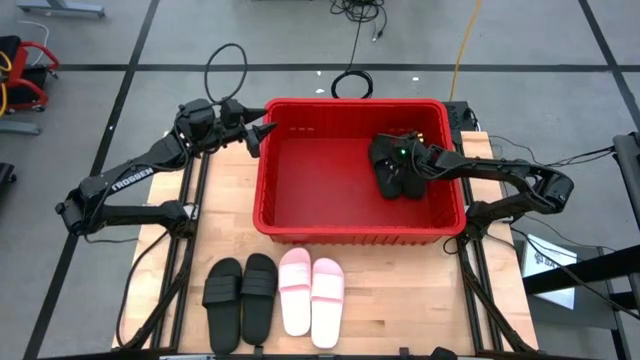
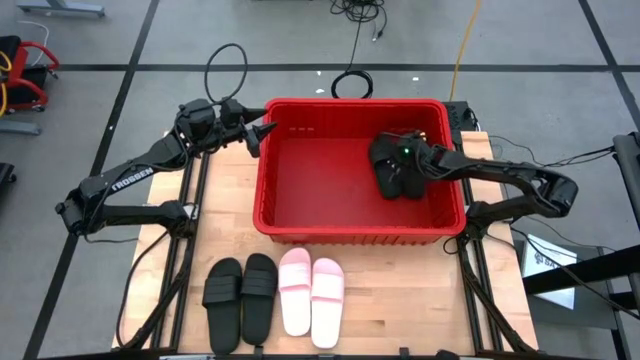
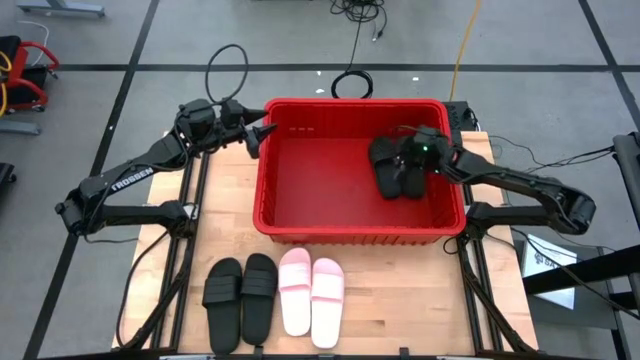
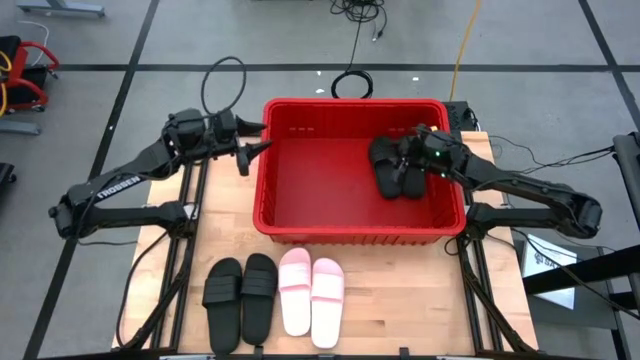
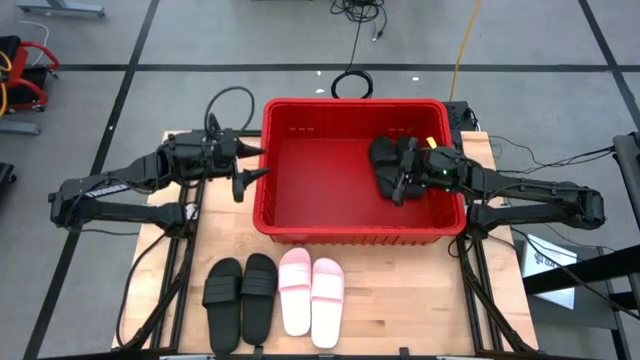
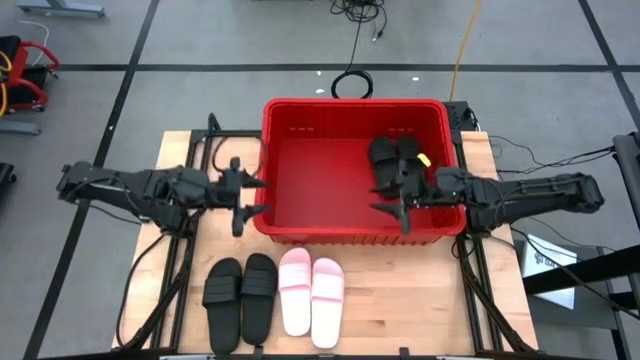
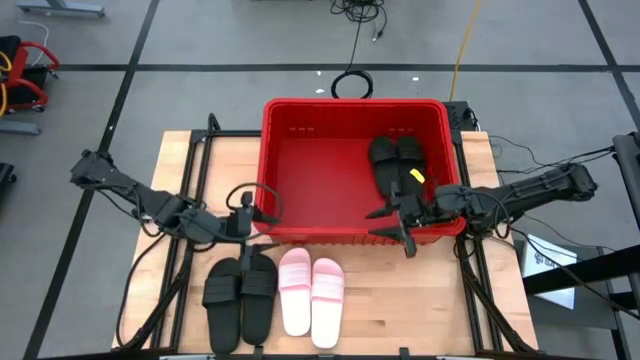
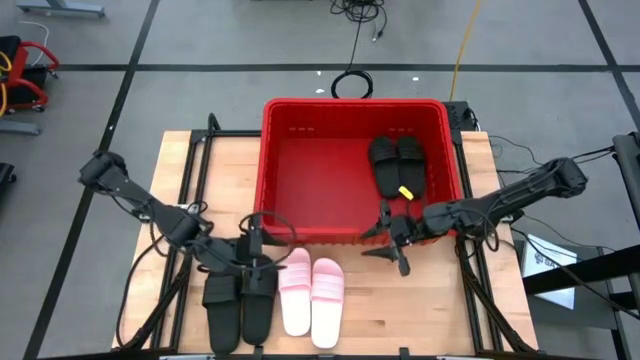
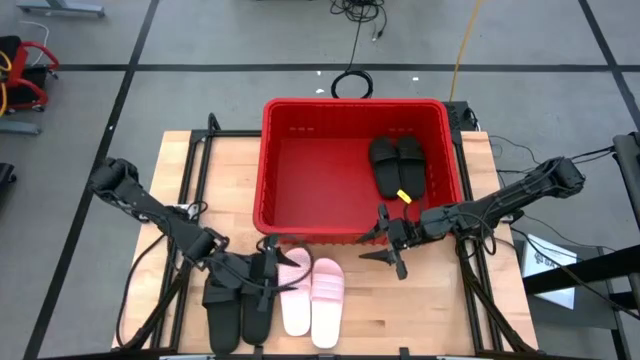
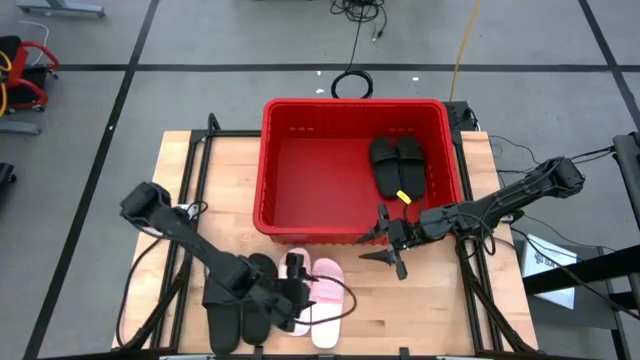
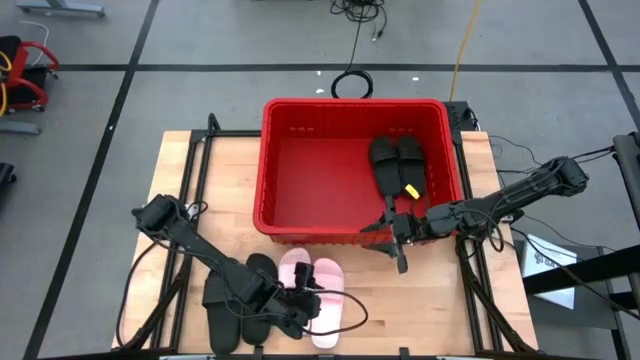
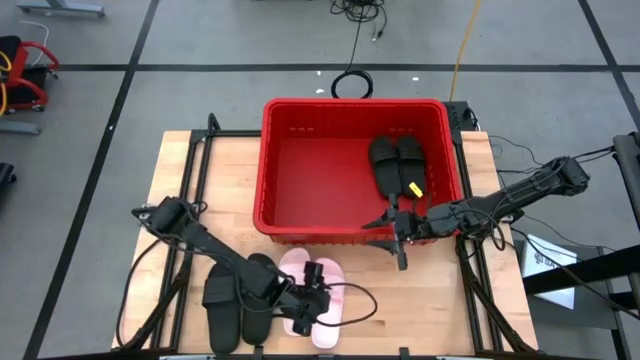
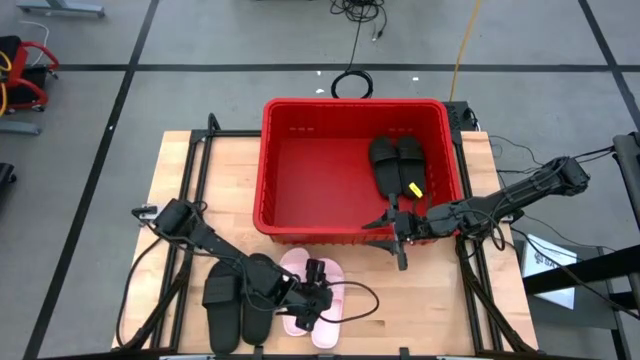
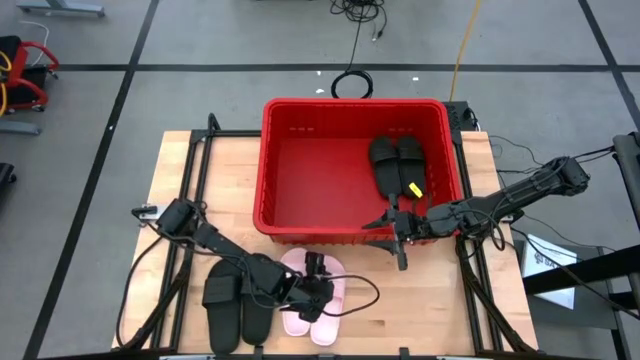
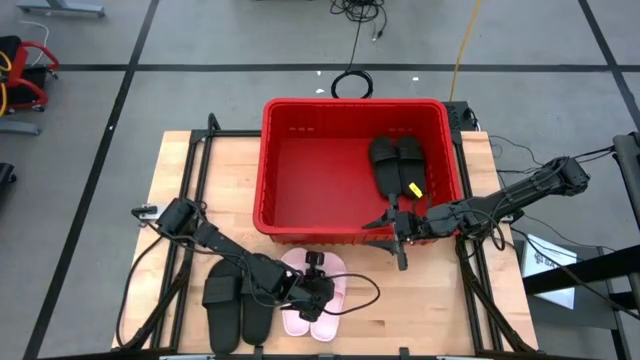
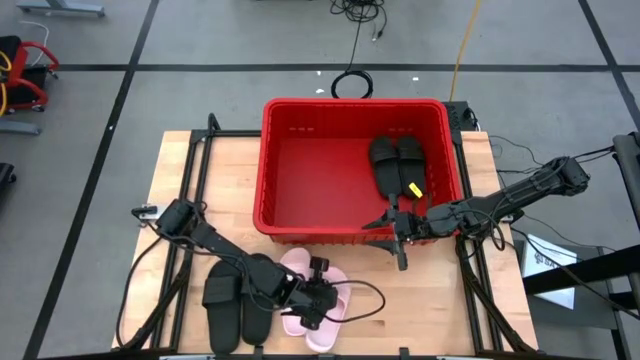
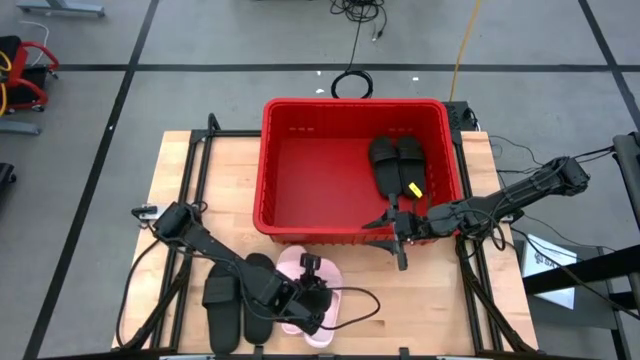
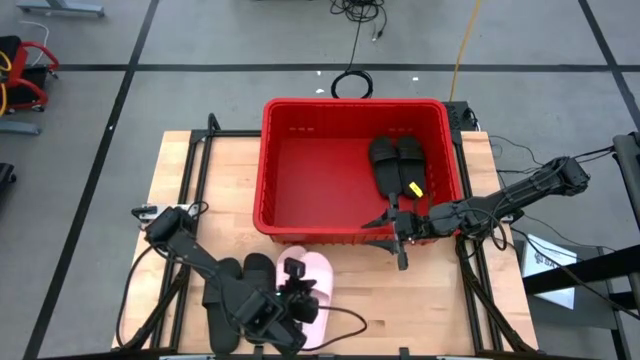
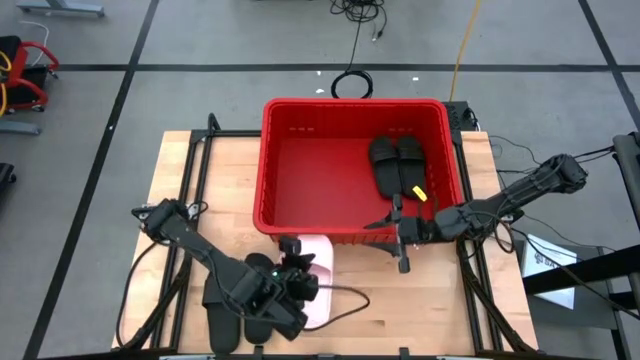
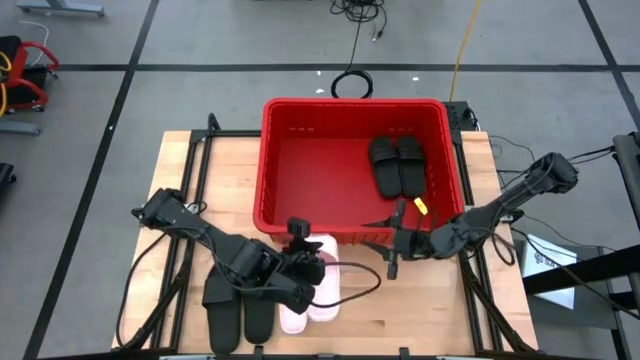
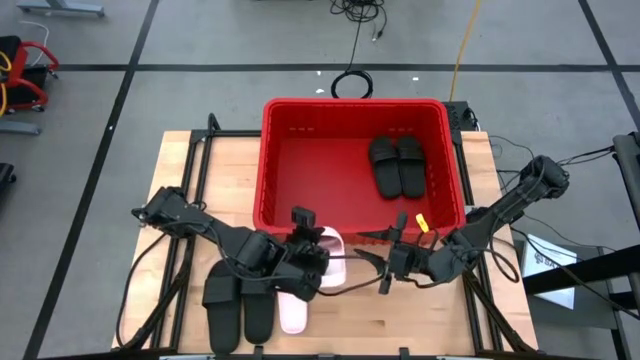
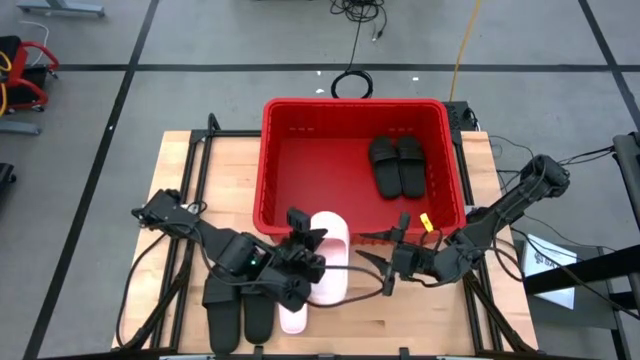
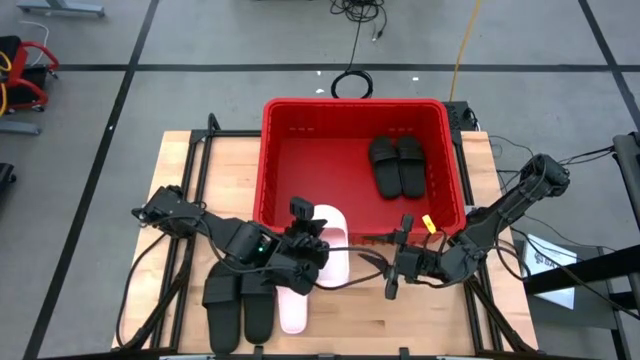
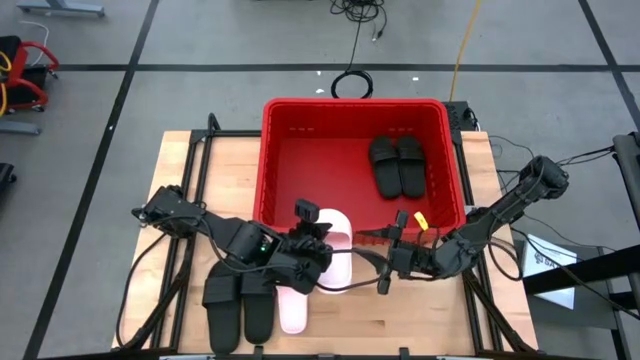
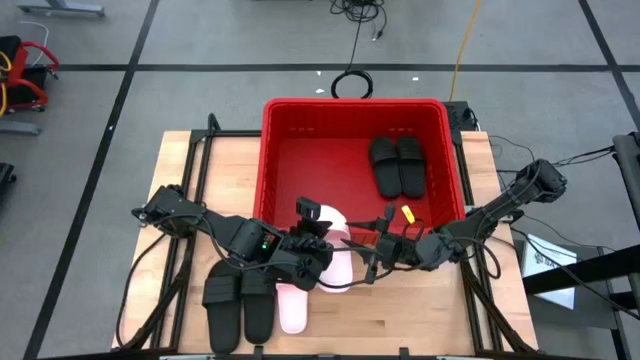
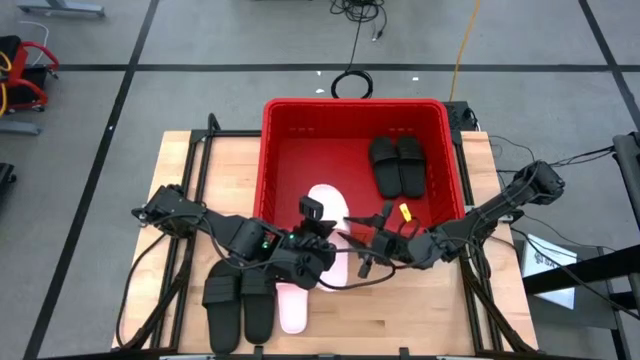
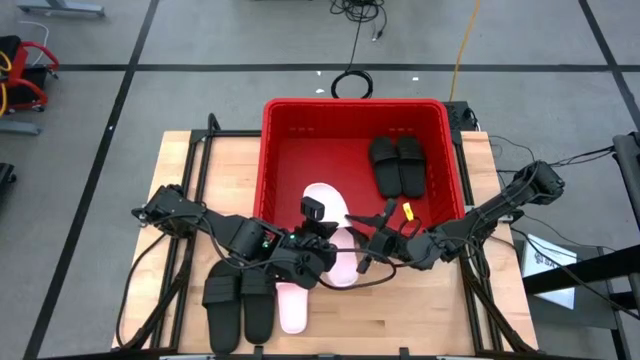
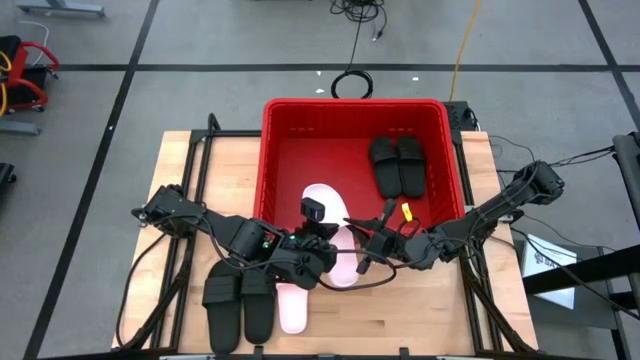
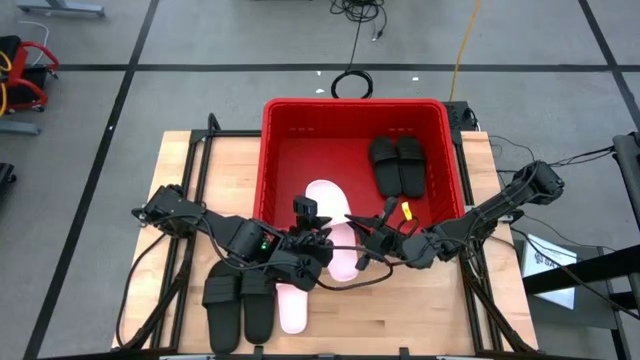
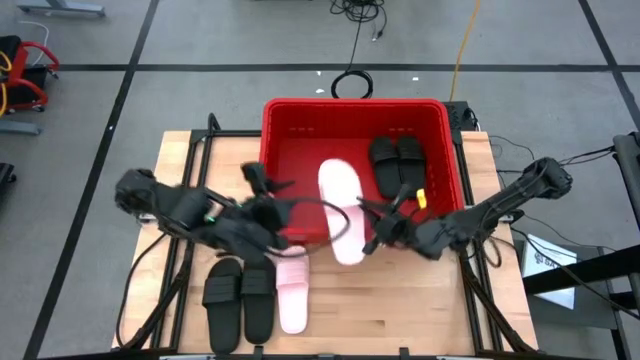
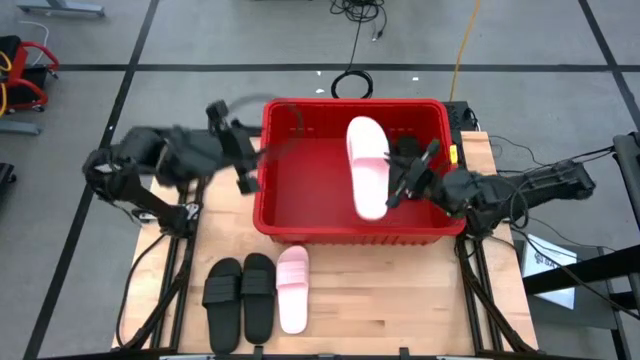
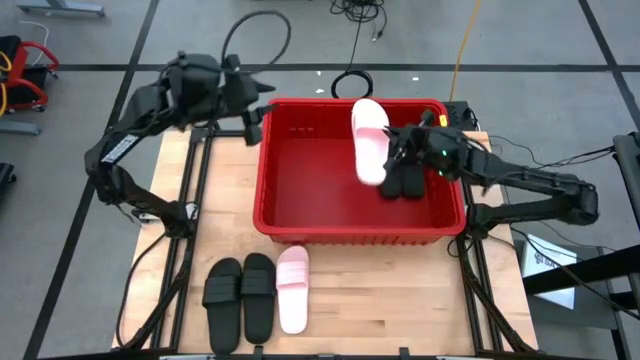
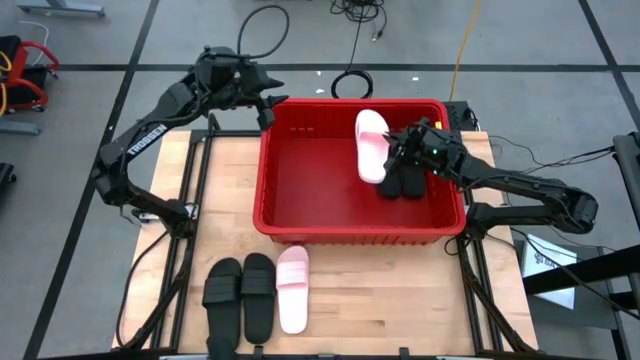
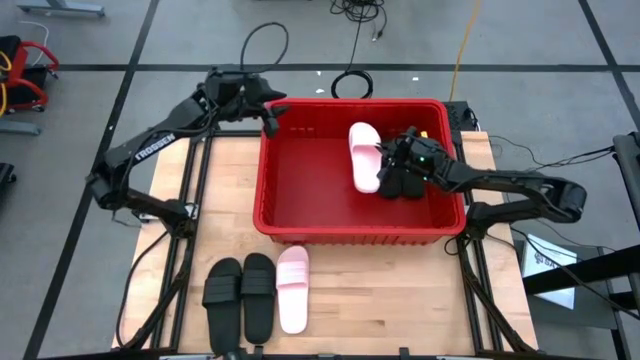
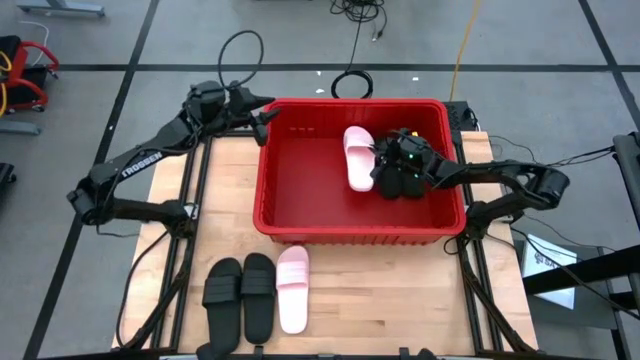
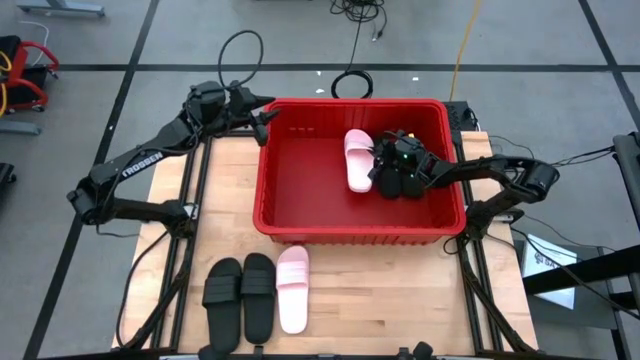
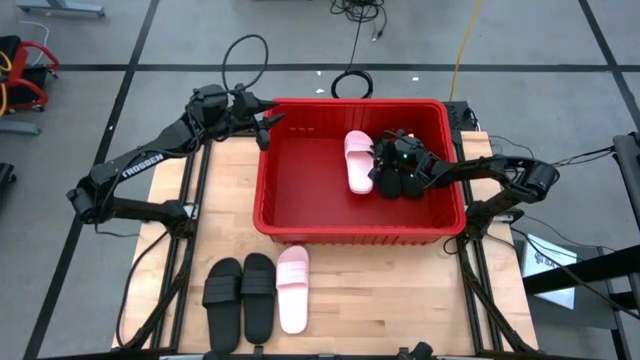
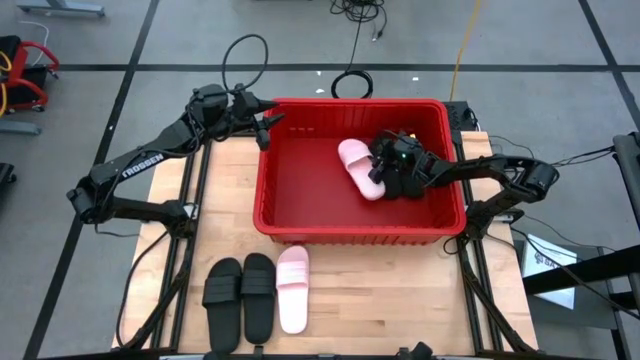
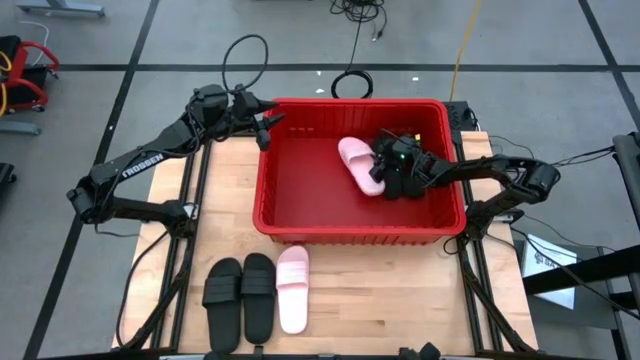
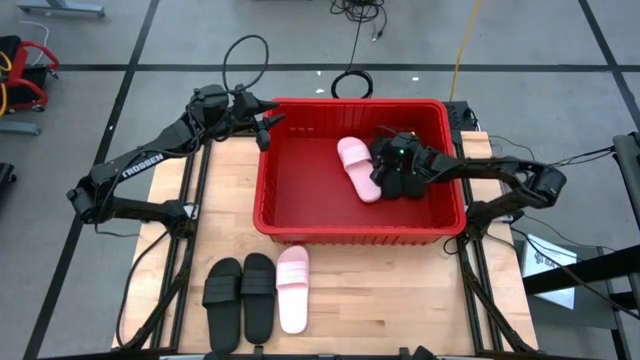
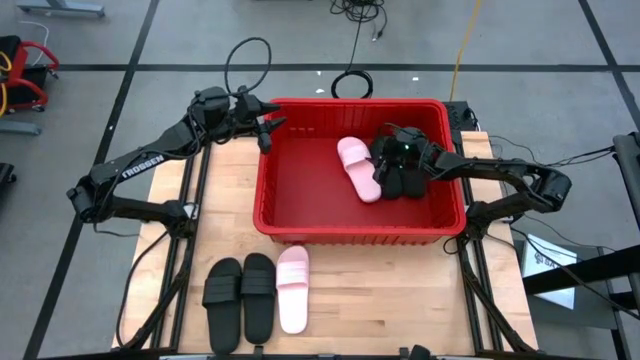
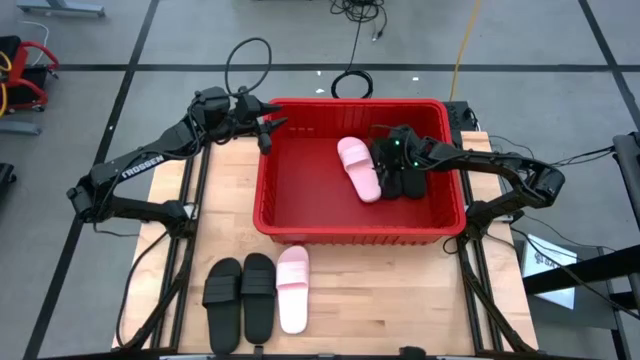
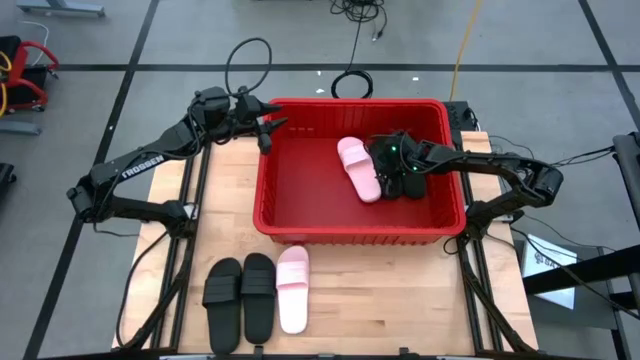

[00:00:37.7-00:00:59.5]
Task: Pick and place slides into bin
Put the pink slide into the red bin
